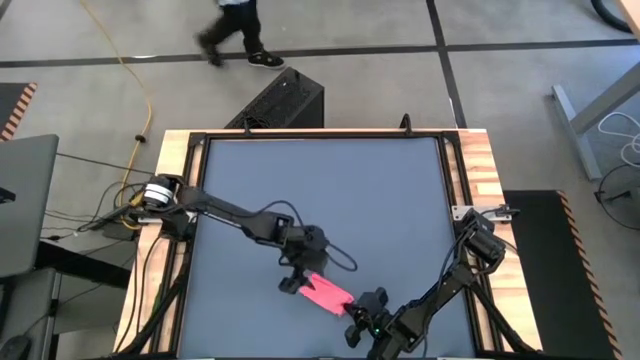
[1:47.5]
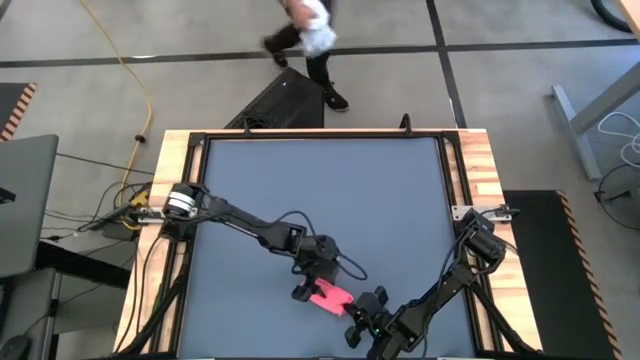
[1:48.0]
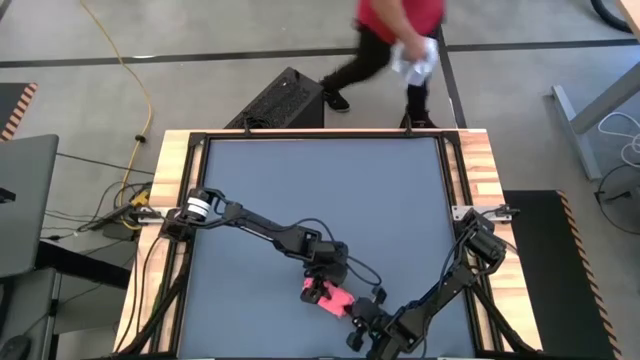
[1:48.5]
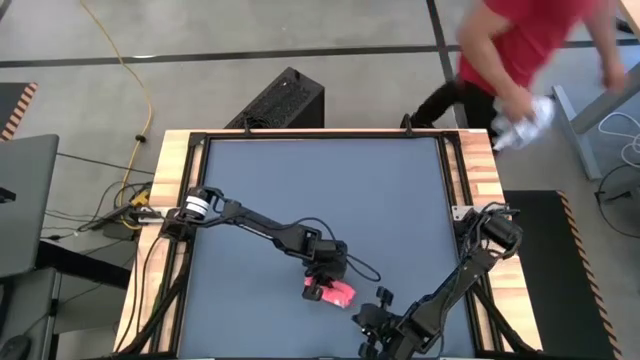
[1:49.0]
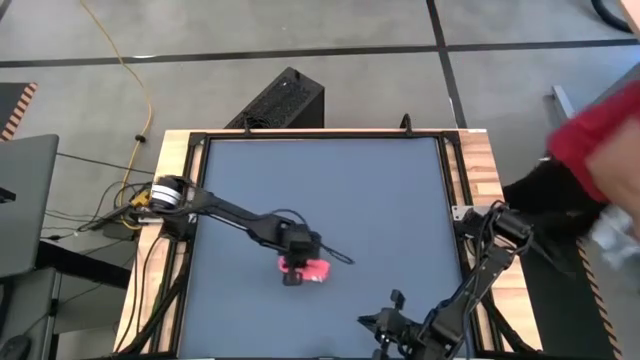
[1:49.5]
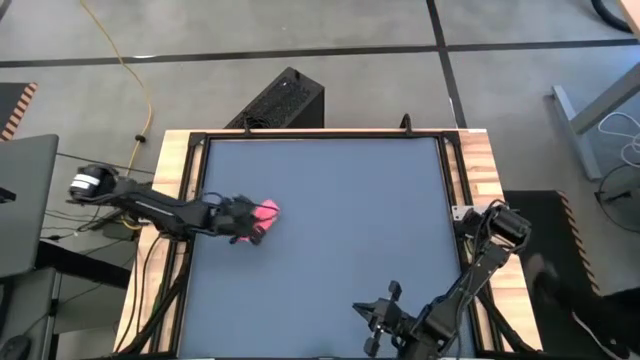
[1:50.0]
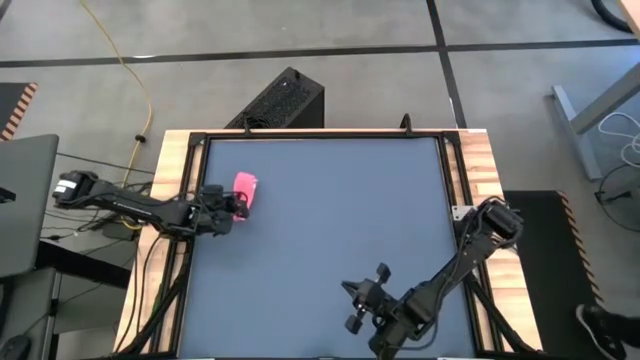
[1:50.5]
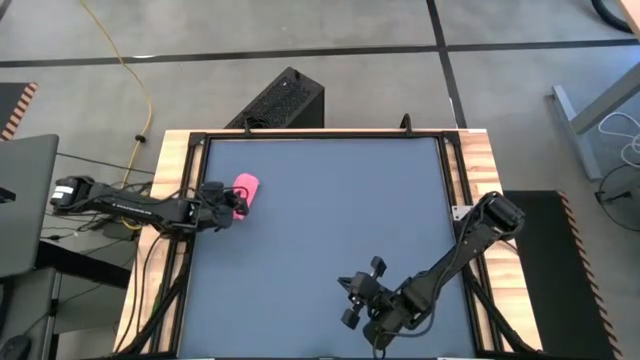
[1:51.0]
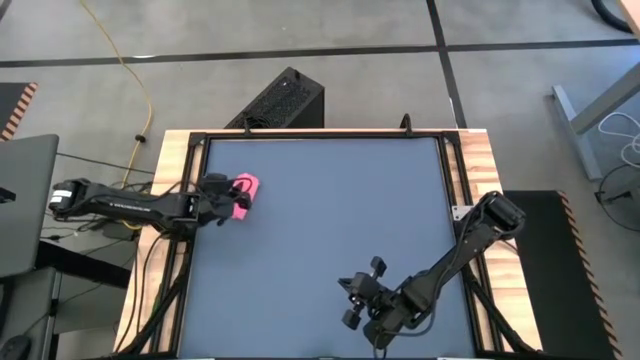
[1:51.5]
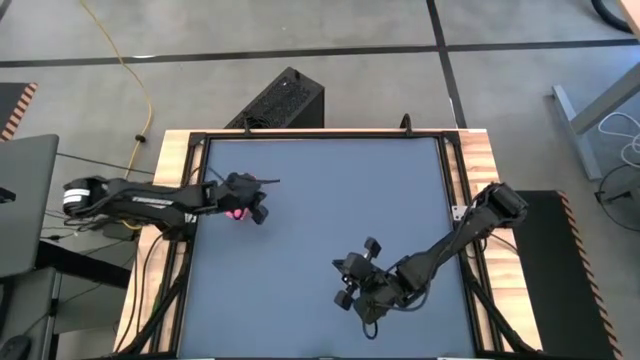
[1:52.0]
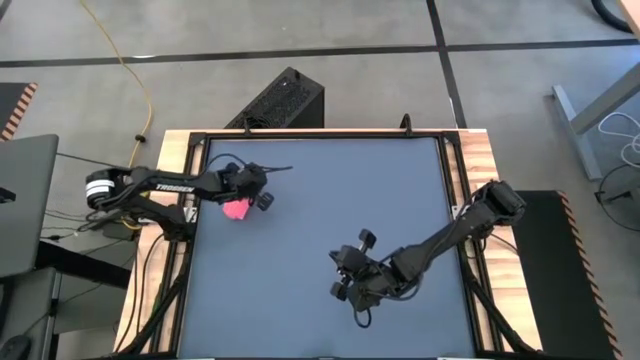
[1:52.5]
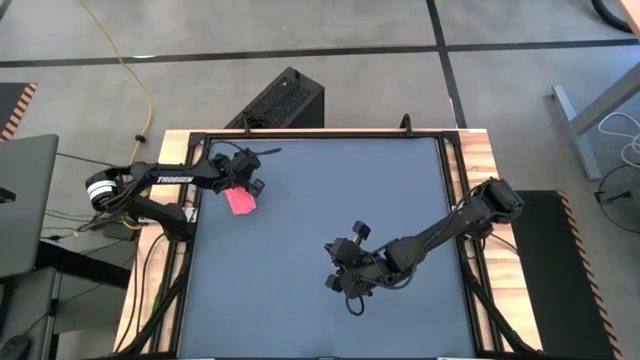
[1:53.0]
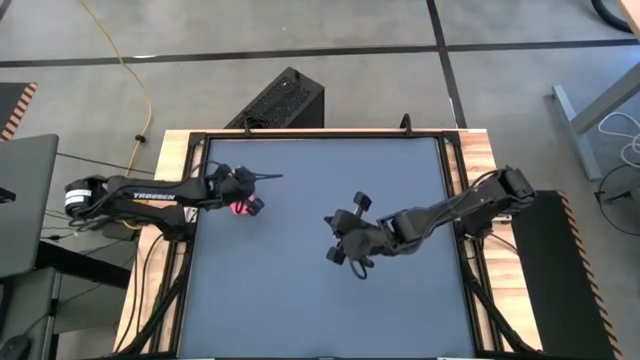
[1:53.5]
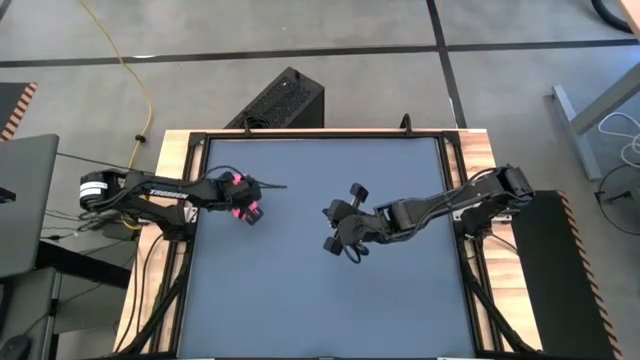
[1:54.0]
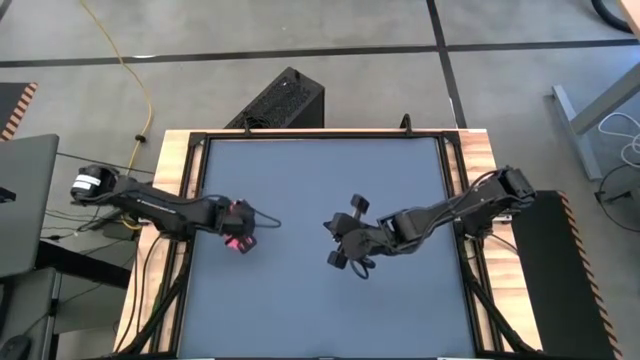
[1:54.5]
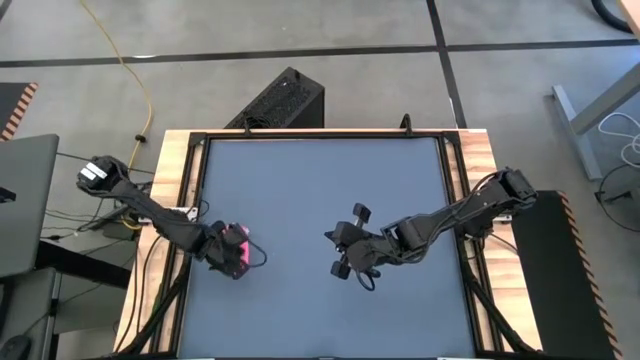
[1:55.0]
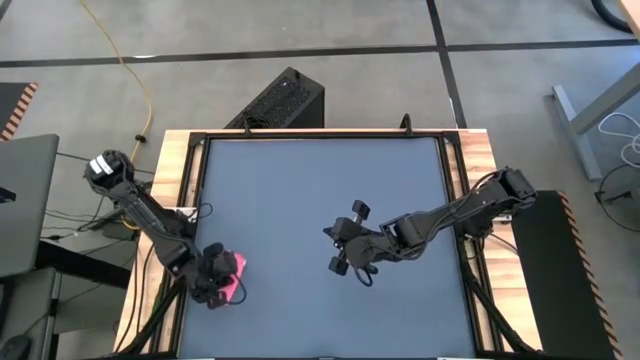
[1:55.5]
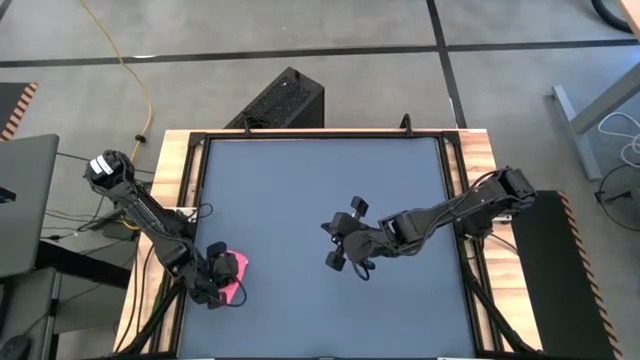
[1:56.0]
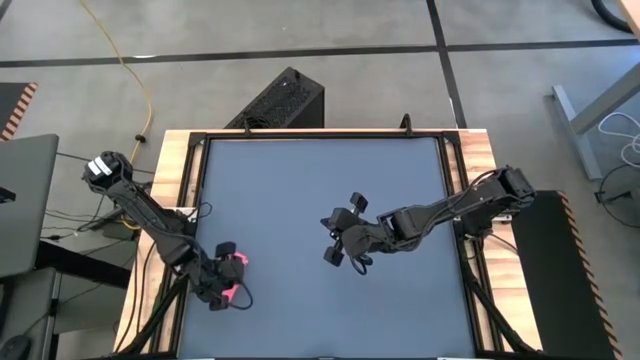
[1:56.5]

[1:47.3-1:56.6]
Task: Roll towel
Move the pink towel to the bottom left of the table

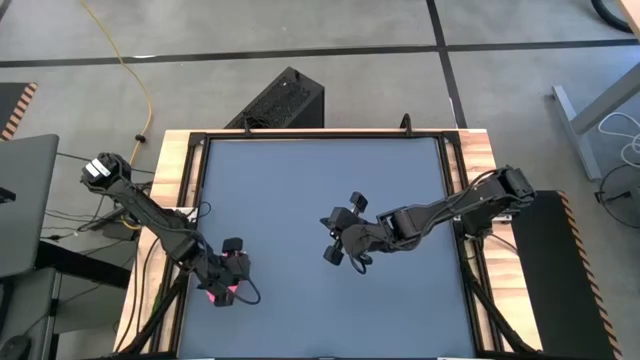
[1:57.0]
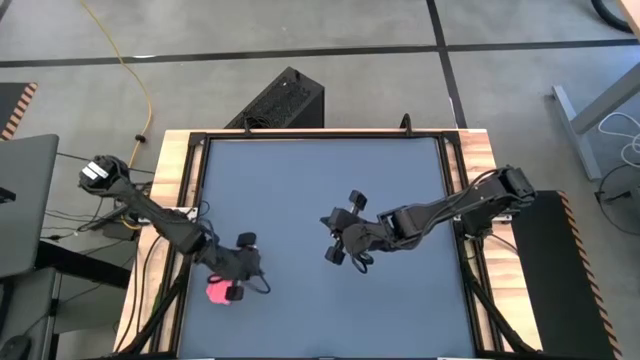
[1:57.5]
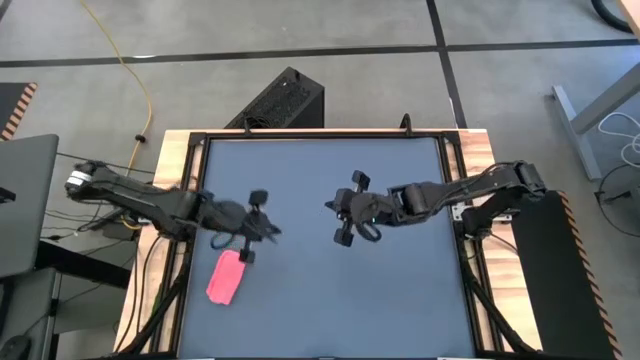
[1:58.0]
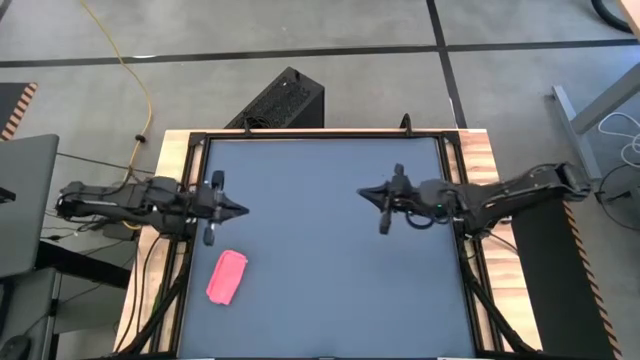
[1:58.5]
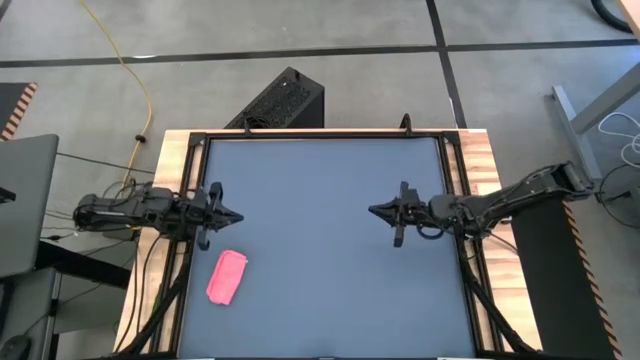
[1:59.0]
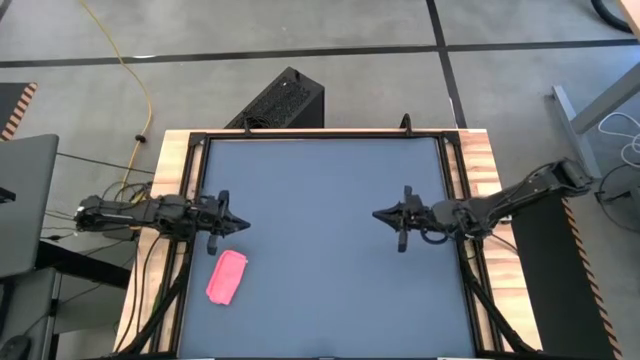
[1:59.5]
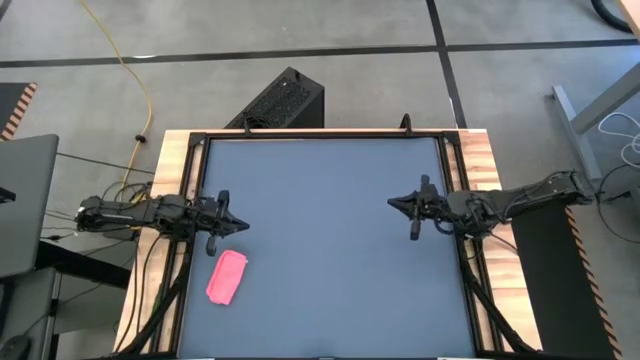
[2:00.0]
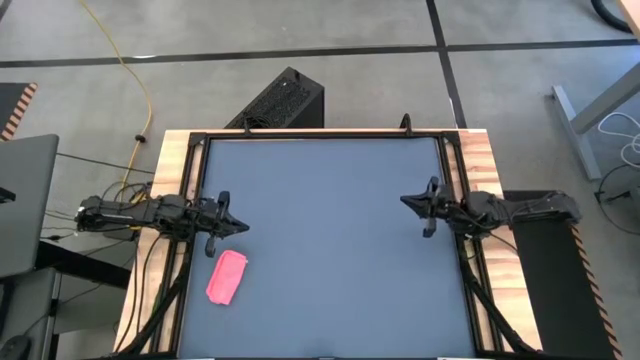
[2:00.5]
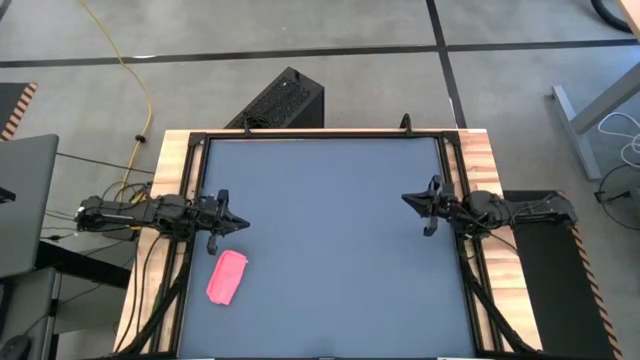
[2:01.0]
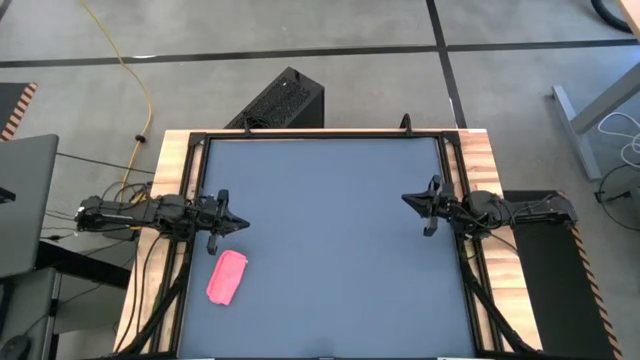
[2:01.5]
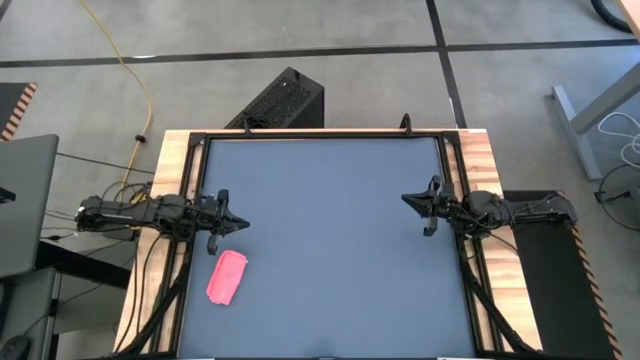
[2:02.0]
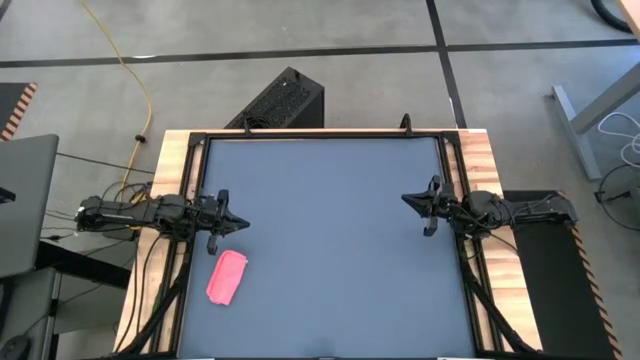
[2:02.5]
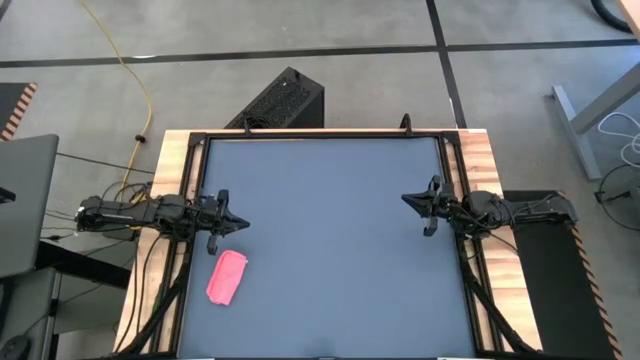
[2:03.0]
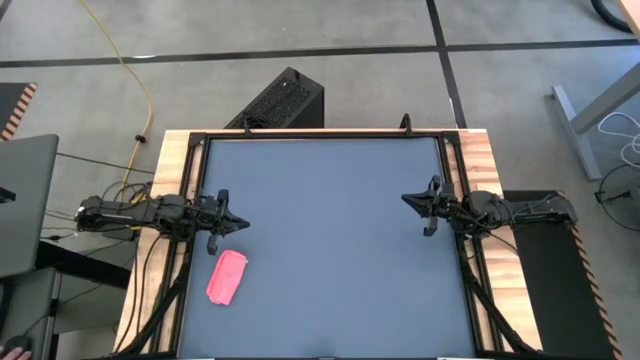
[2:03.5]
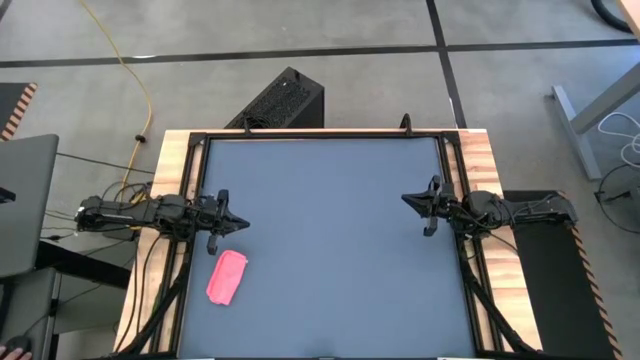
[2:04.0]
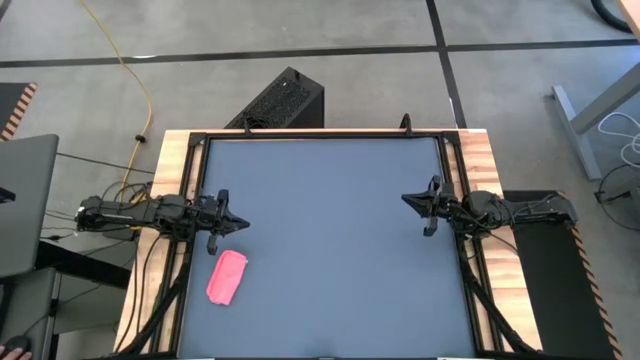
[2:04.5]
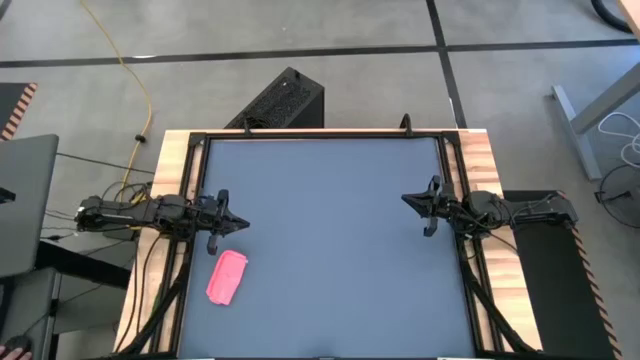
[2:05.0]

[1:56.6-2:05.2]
Return to Home Position

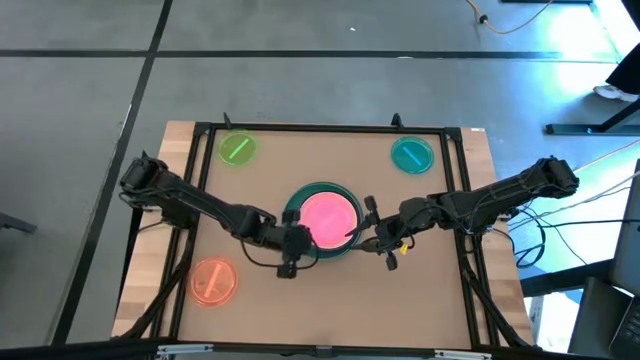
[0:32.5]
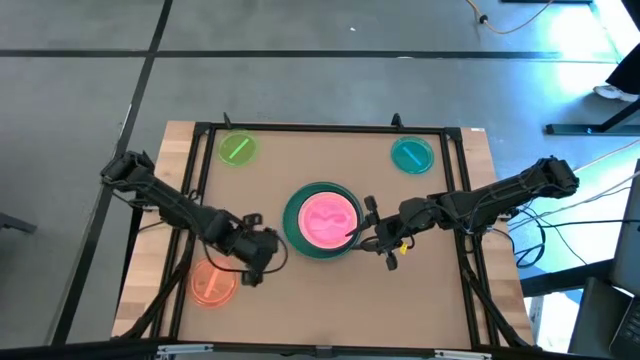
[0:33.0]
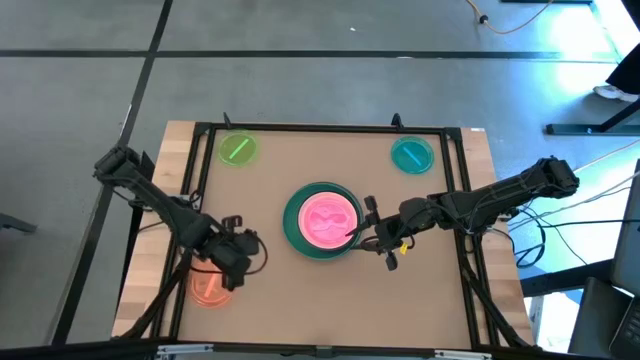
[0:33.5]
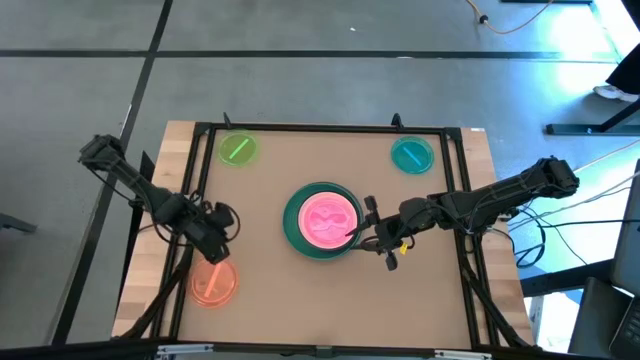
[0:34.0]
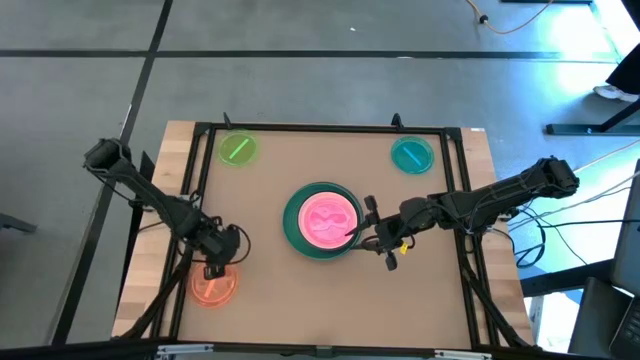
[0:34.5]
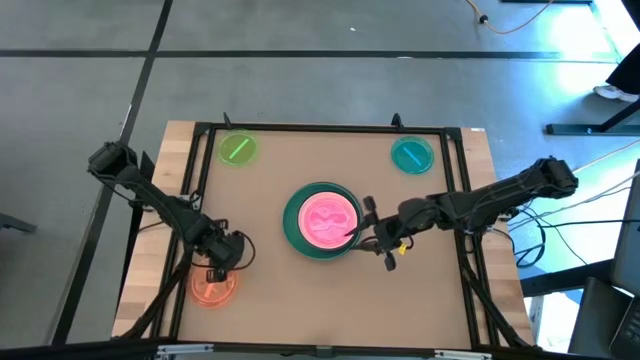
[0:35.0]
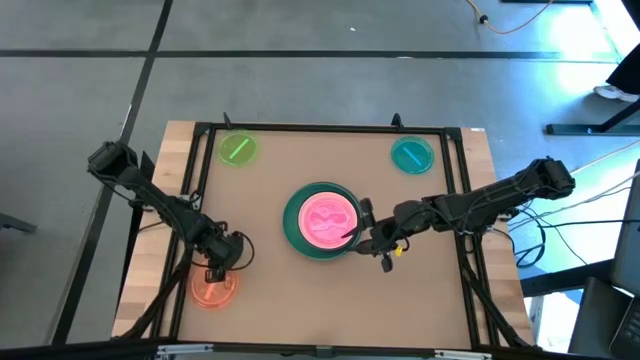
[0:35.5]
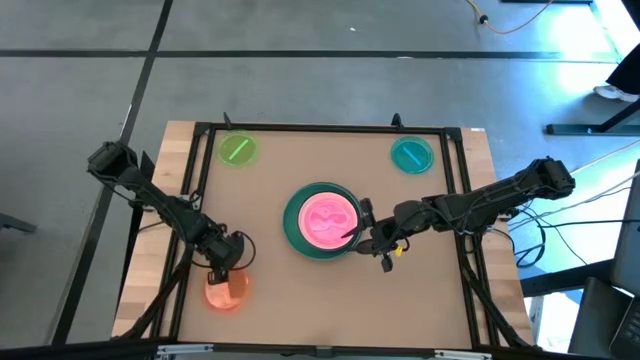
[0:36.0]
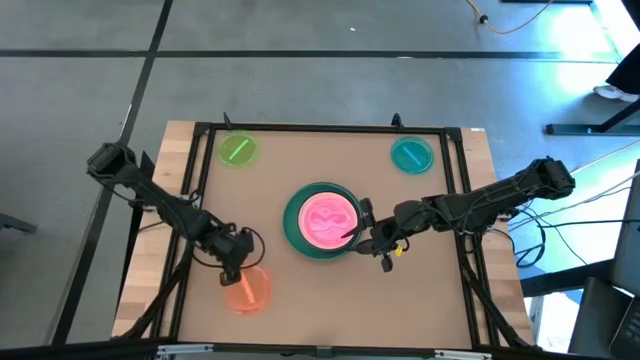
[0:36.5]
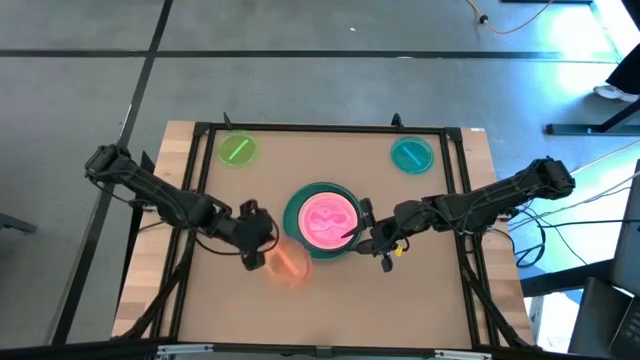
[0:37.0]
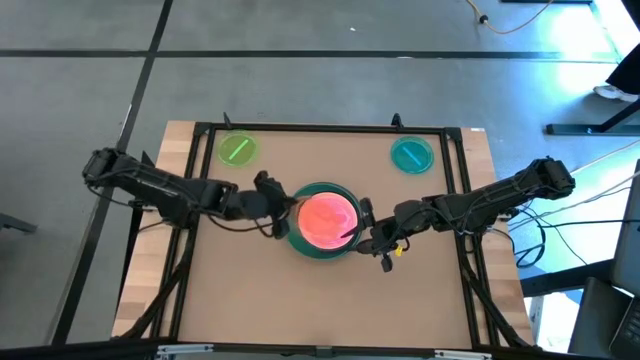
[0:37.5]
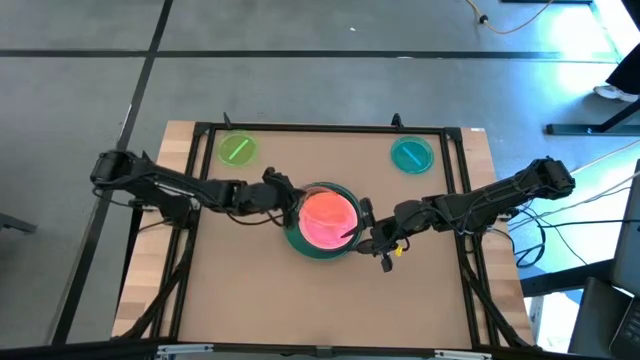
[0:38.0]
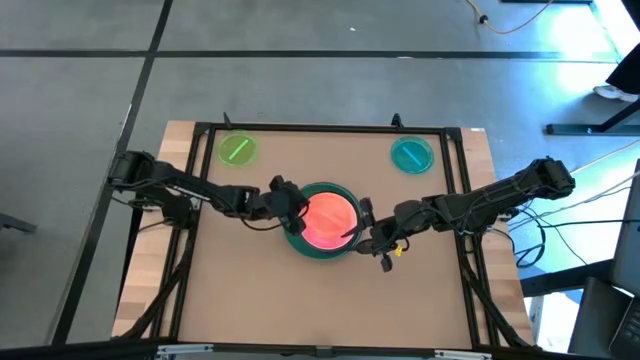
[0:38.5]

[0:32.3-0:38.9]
Task: Stack plastic plates
Stack the transparent orange plate on top of the transparent pink plate
